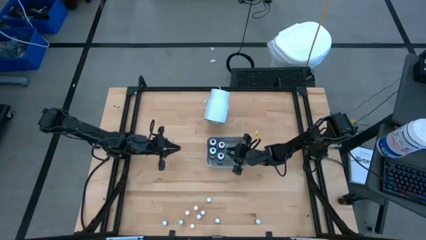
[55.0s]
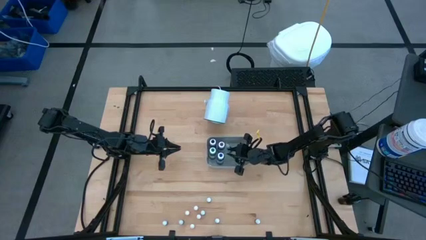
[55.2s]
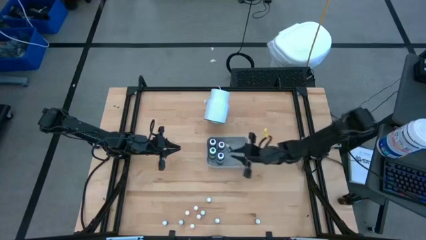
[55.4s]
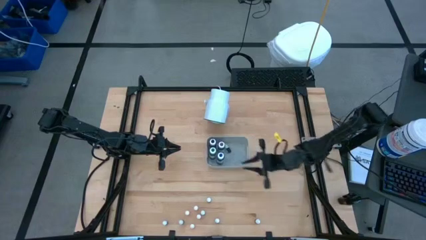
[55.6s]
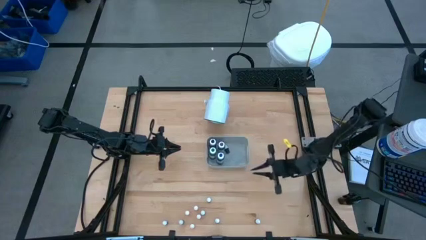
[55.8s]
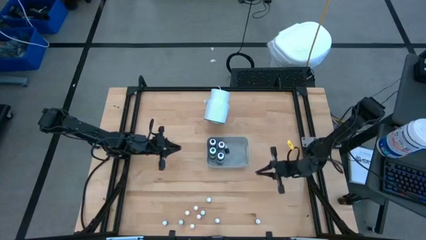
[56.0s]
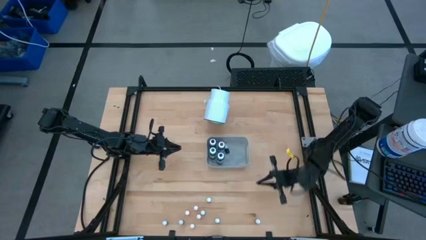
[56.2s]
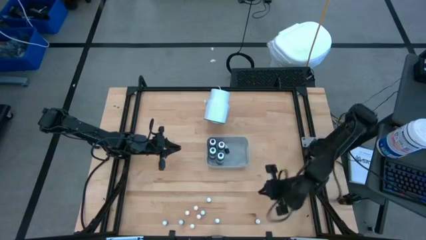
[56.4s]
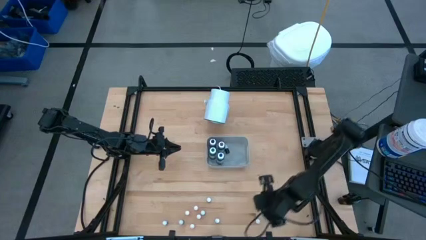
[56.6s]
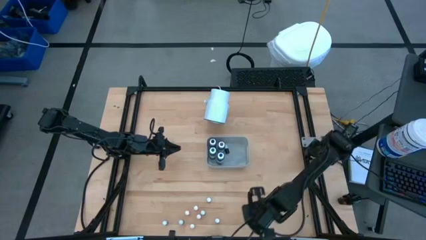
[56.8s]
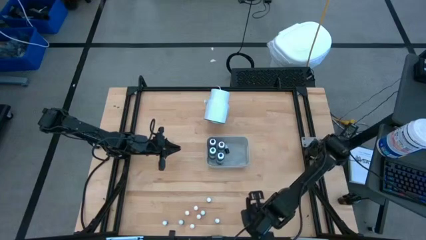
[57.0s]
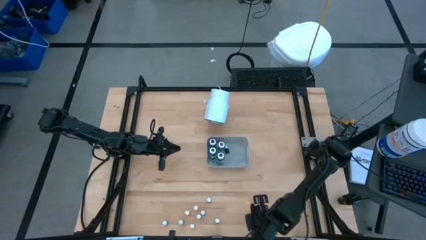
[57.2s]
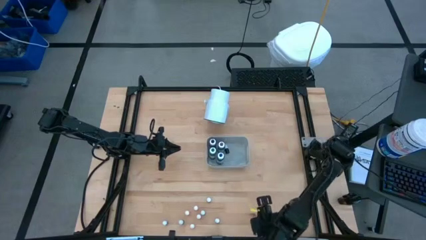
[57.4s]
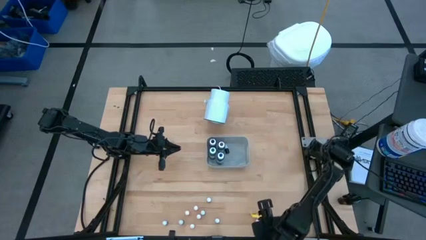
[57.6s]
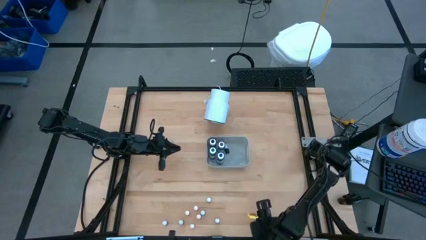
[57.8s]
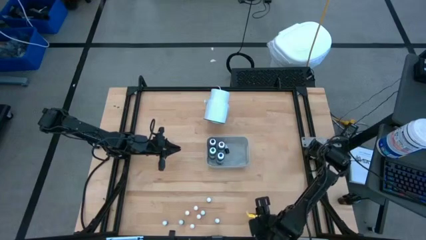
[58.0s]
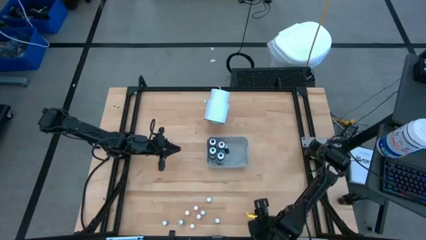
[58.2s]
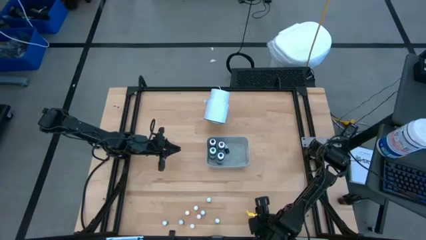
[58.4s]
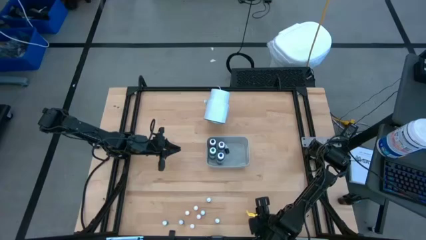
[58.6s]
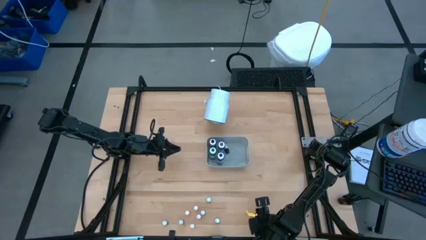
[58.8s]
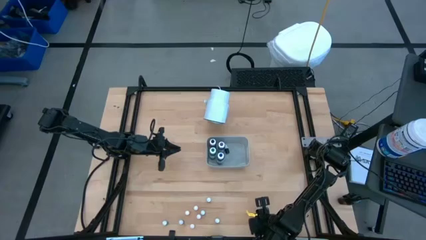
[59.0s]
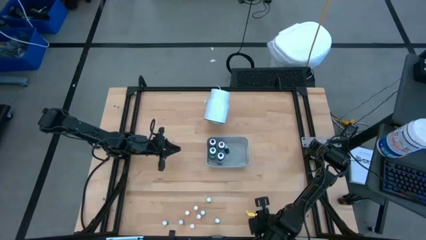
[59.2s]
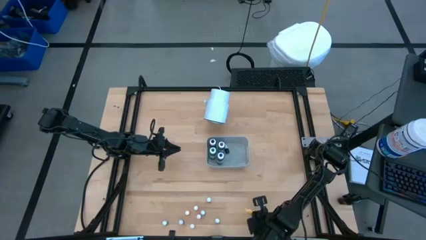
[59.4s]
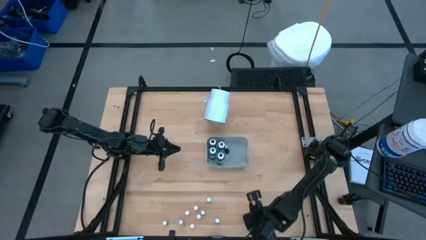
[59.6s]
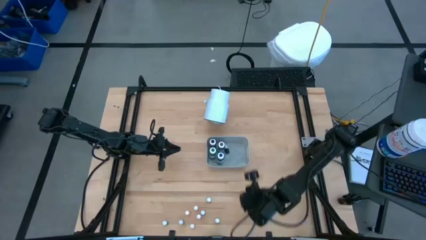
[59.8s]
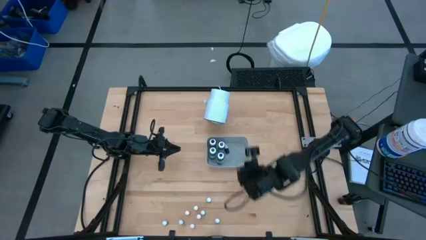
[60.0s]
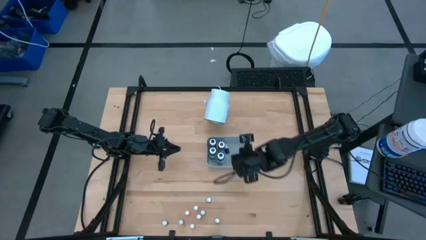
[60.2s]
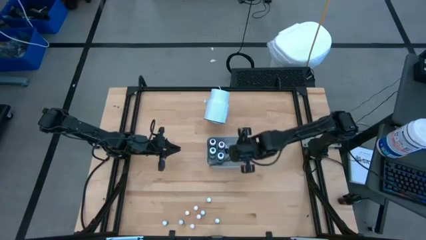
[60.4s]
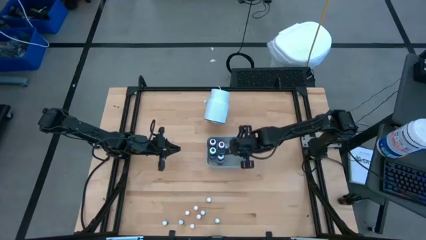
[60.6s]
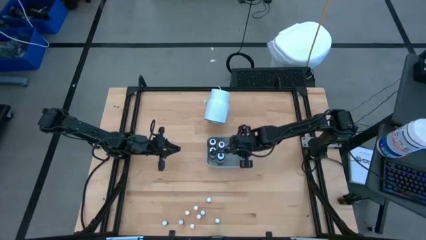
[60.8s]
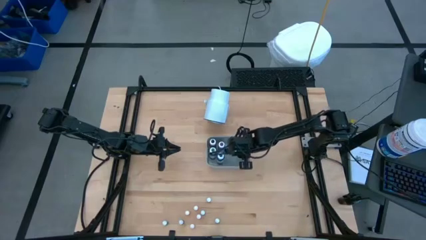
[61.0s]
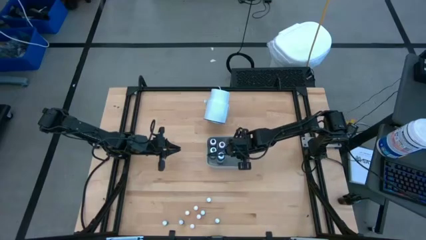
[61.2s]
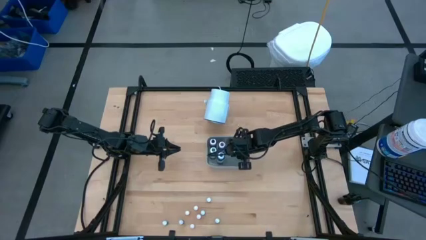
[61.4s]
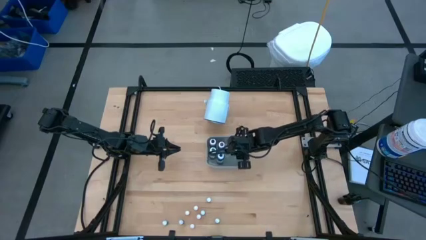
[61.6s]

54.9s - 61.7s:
Task: Pick & Place food coloring
Put the small red food coloring bottle into the gray bin

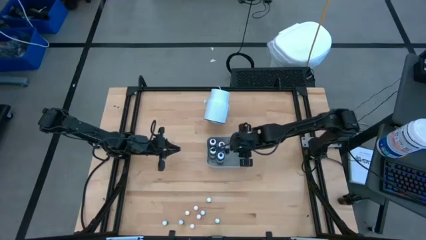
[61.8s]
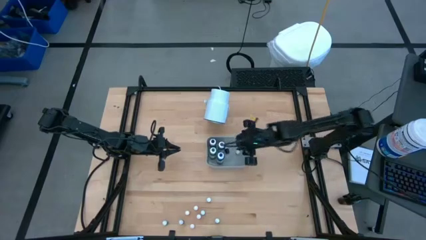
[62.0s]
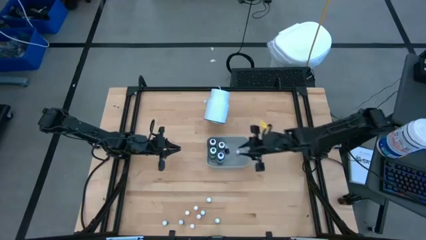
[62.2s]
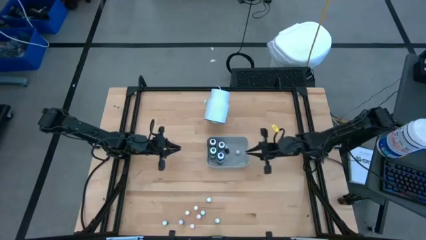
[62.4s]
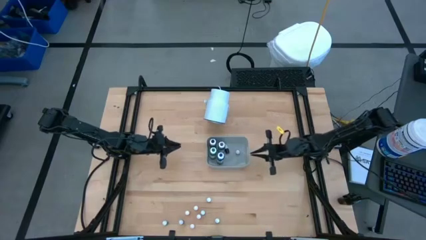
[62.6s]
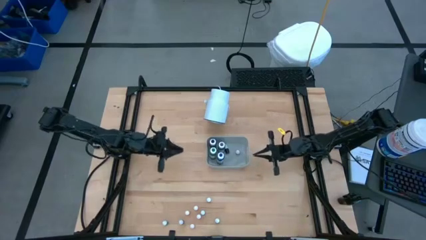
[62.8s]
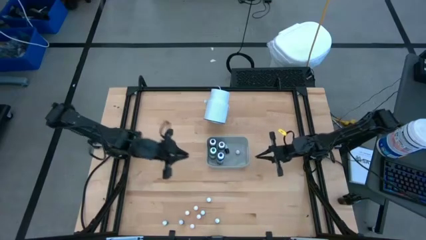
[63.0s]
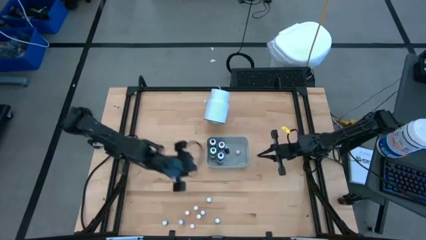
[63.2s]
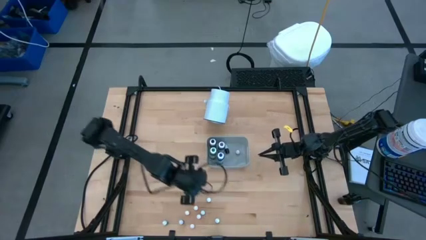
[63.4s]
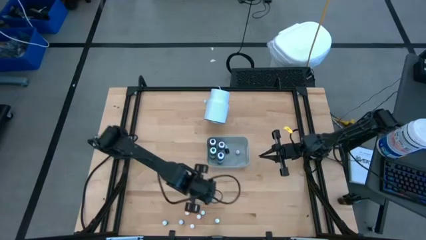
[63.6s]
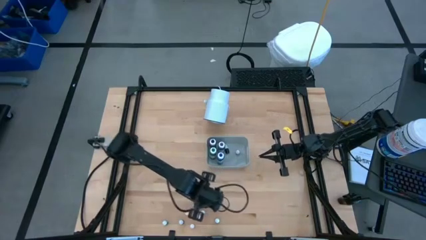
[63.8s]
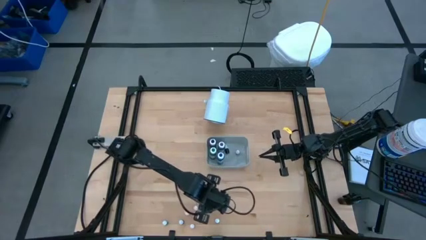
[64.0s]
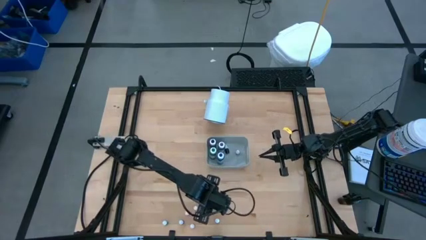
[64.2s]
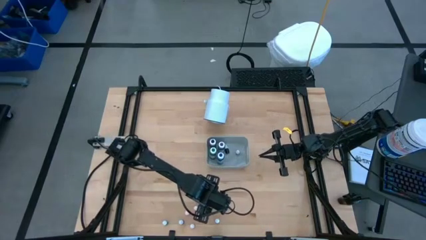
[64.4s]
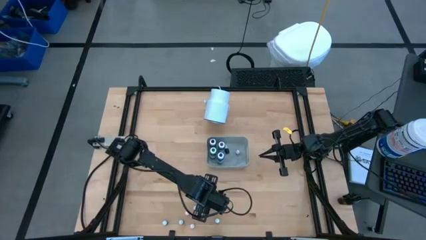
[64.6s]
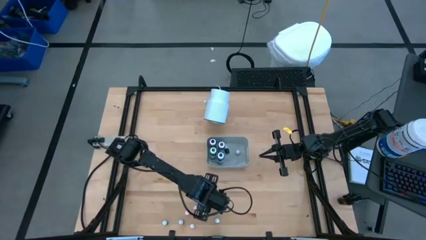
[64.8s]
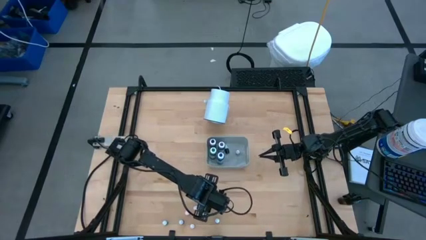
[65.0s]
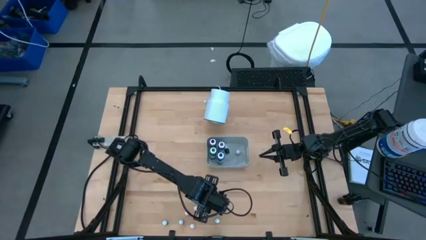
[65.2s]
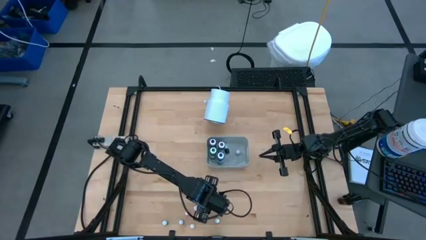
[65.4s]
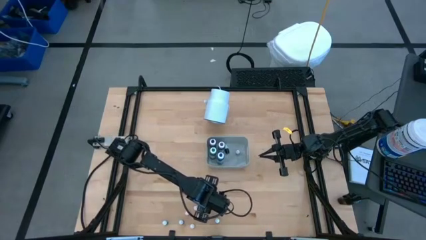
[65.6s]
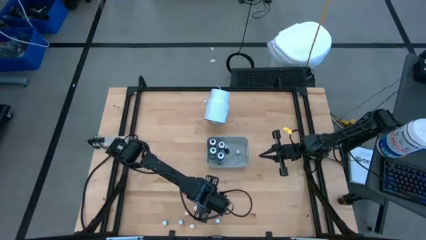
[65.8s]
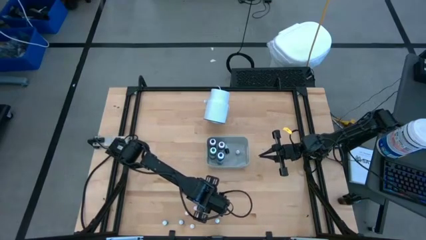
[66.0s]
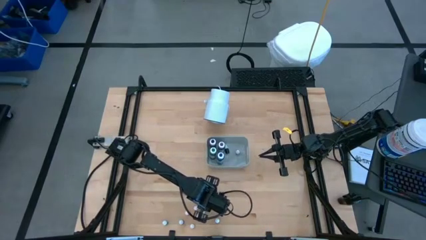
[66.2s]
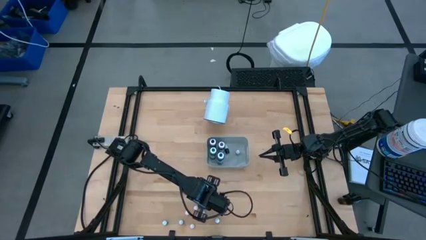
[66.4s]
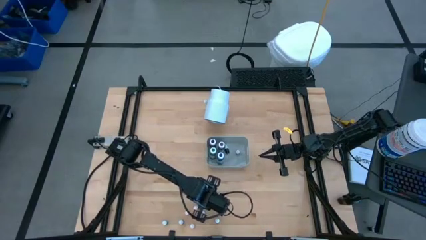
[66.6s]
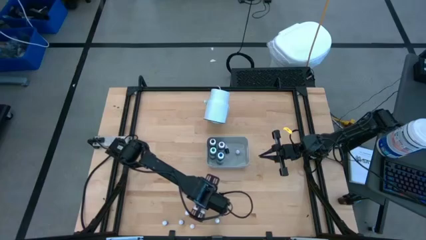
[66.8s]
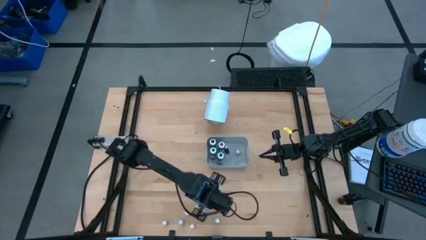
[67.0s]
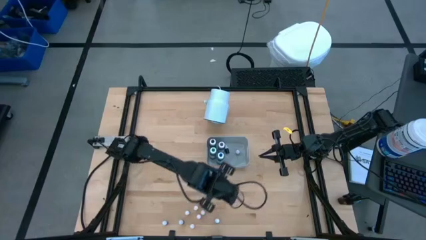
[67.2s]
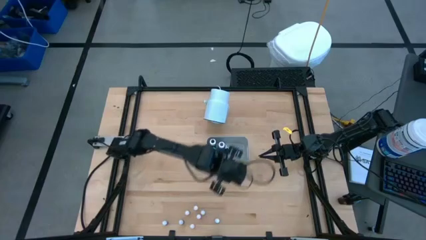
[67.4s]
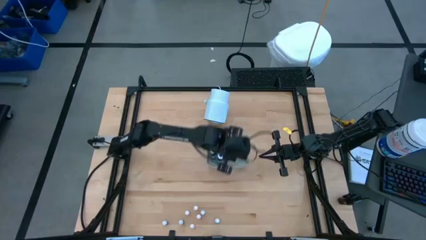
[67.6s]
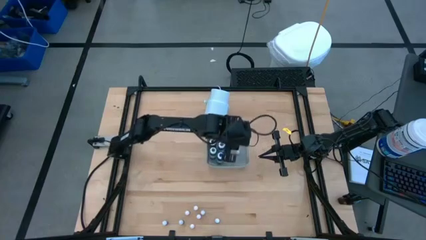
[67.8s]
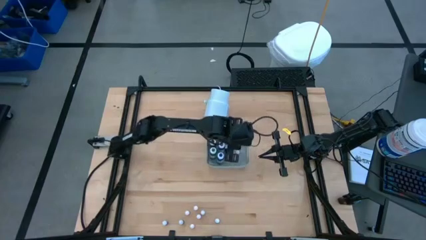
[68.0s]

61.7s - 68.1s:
Put the small red food coloring bottle into the gray bin
